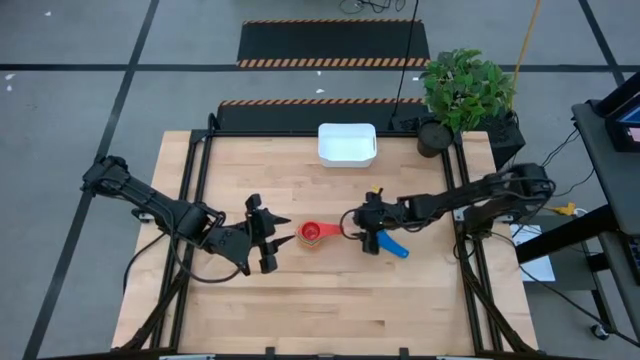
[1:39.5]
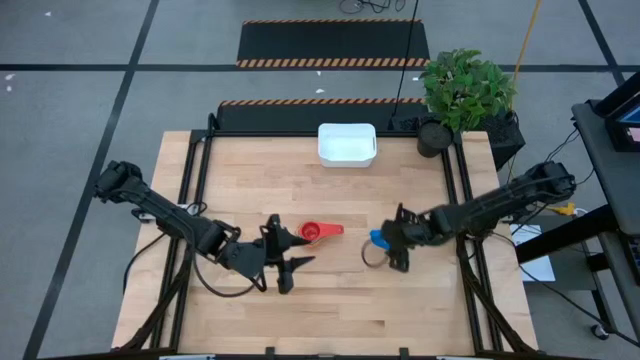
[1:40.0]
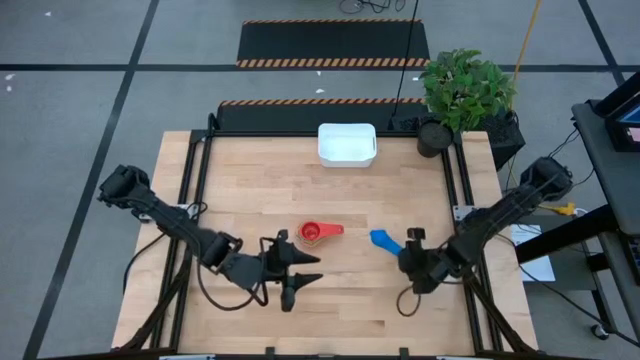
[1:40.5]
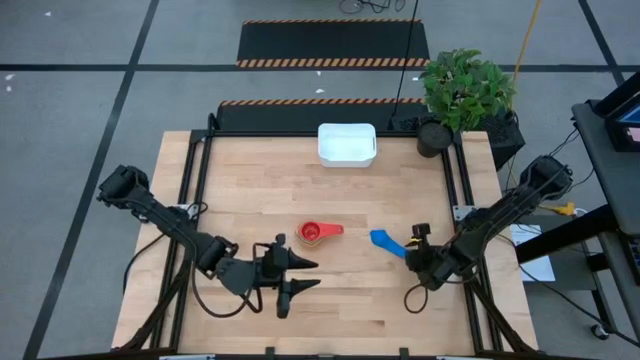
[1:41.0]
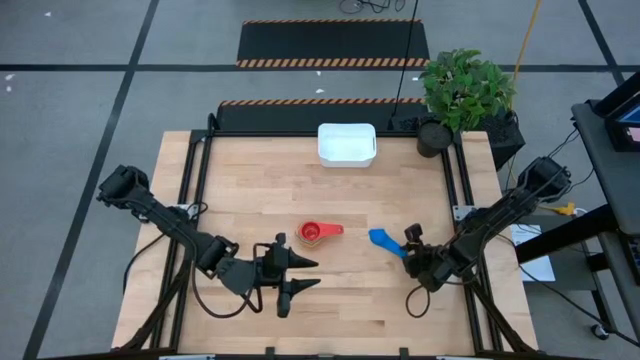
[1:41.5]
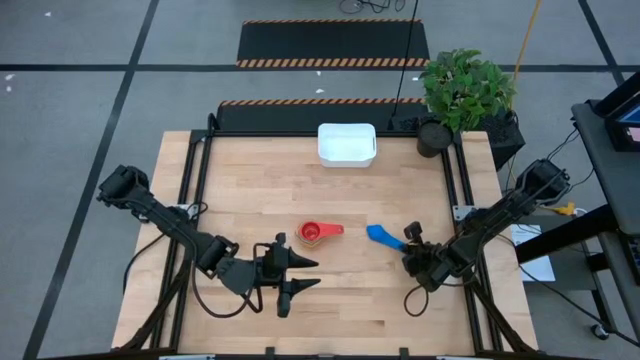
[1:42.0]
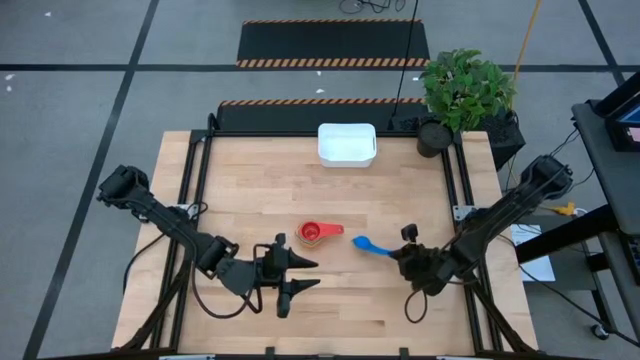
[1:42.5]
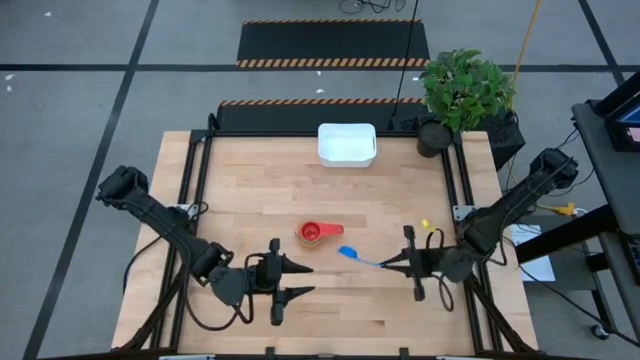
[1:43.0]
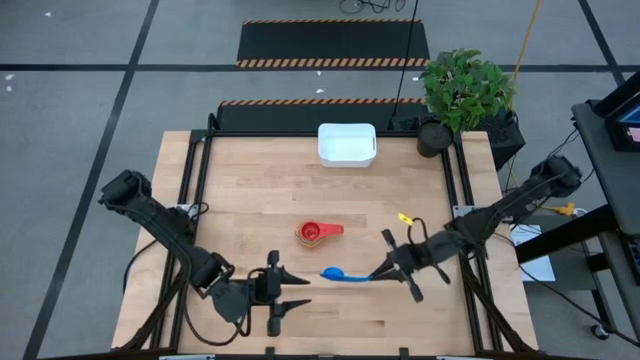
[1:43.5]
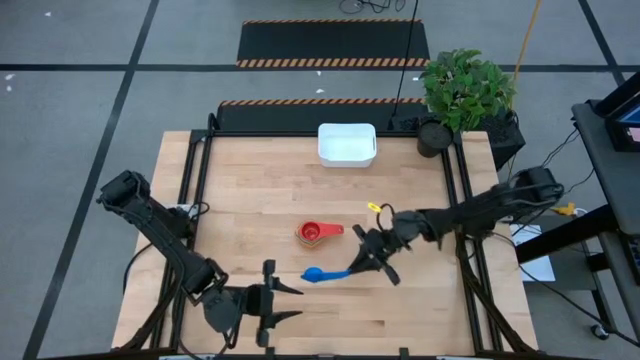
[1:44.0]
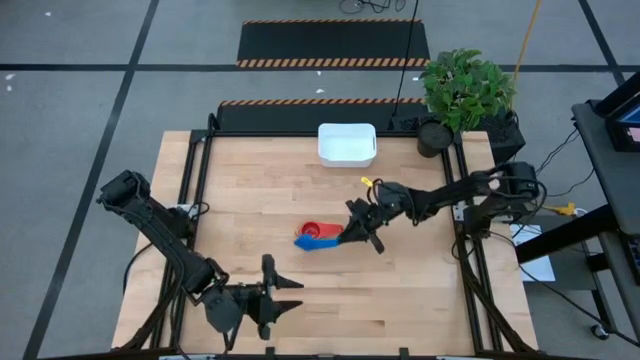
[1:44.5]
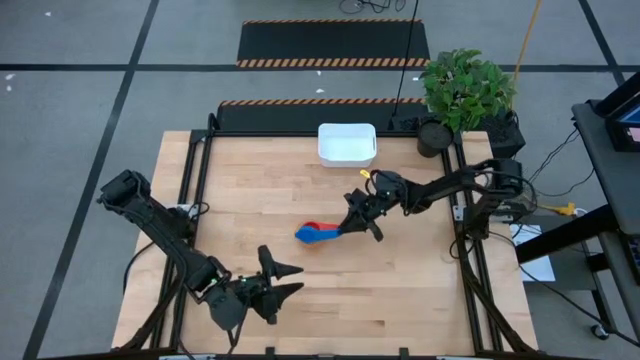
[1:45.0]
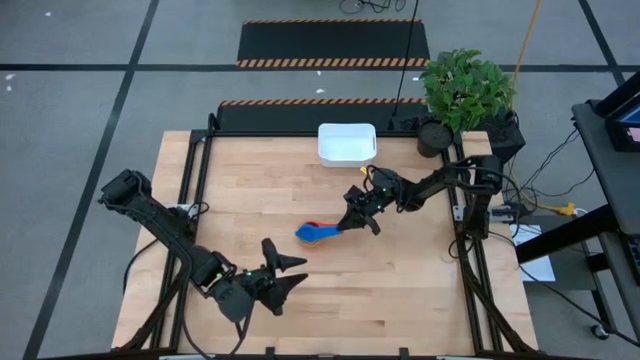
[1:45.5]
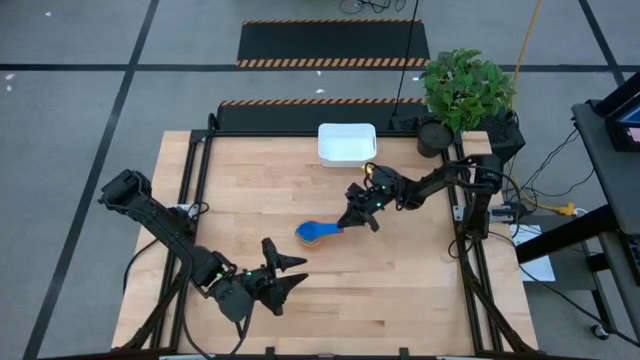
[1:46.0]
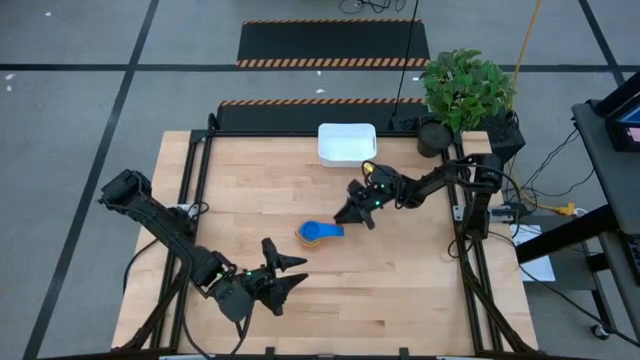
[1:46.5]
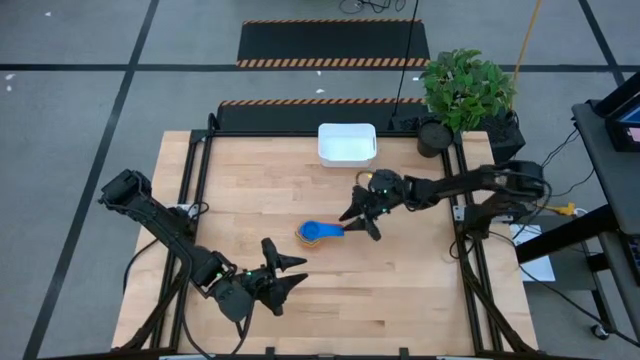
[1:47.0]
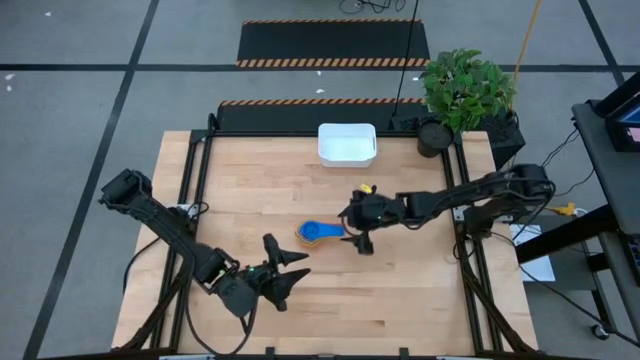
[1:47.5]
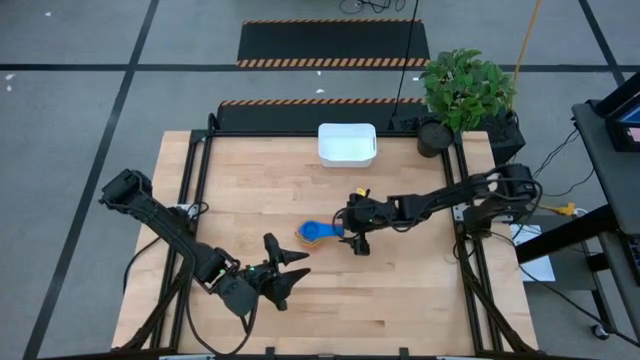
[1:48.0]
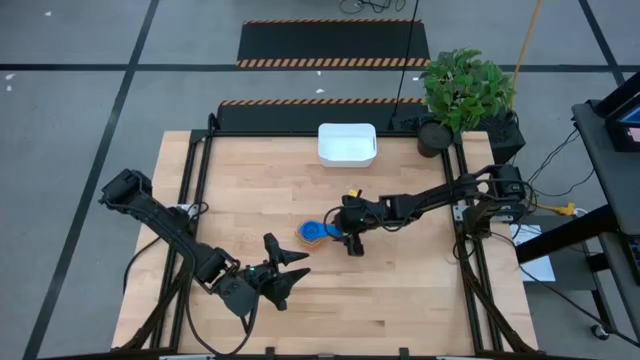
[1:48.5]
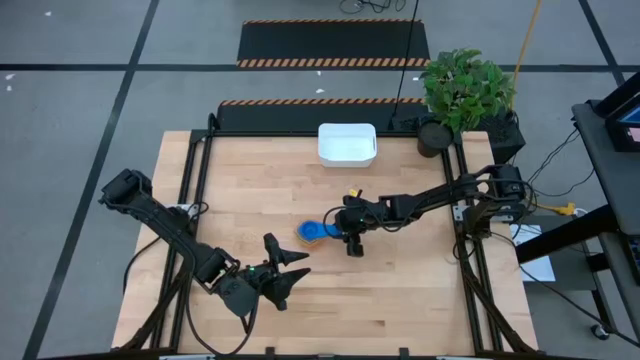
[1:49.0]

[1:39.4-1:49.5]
Task: Nest measuring cups in basket
Stack the blue measuring cup into the red measuring cup

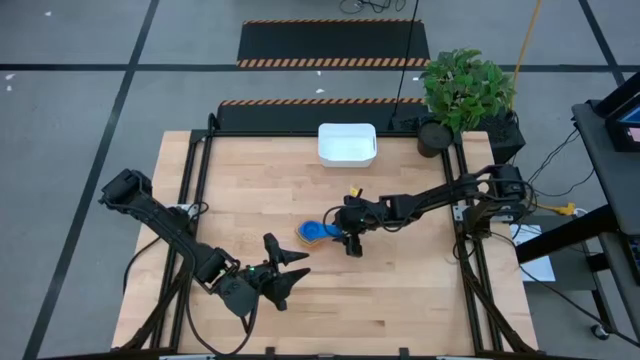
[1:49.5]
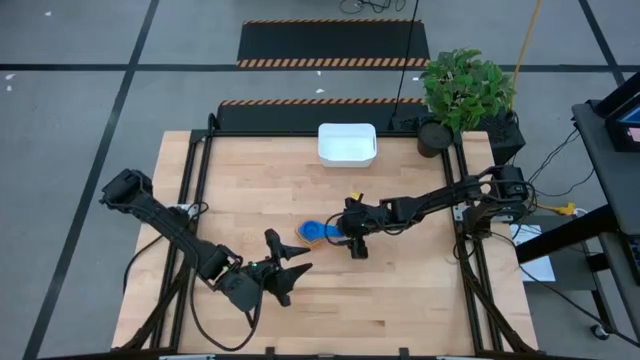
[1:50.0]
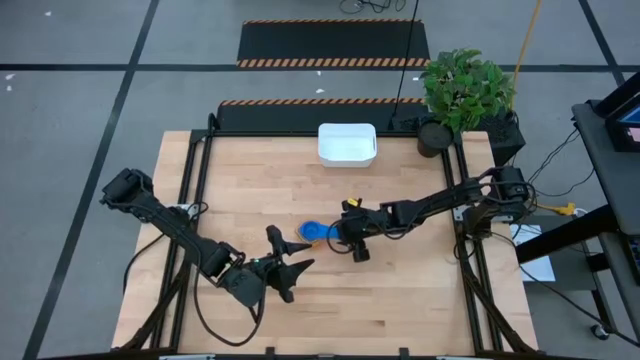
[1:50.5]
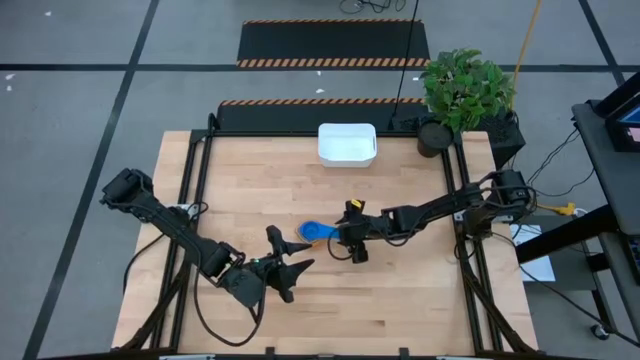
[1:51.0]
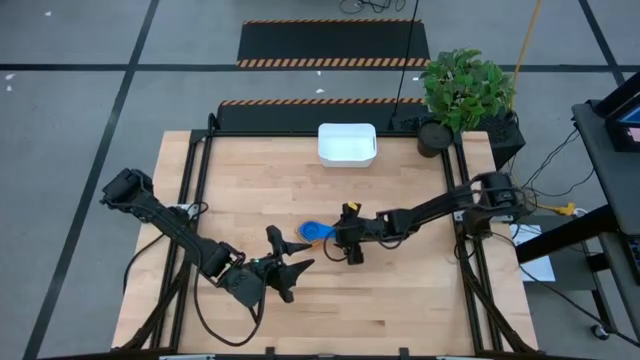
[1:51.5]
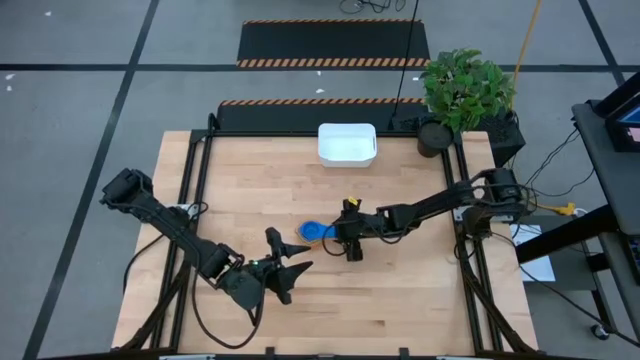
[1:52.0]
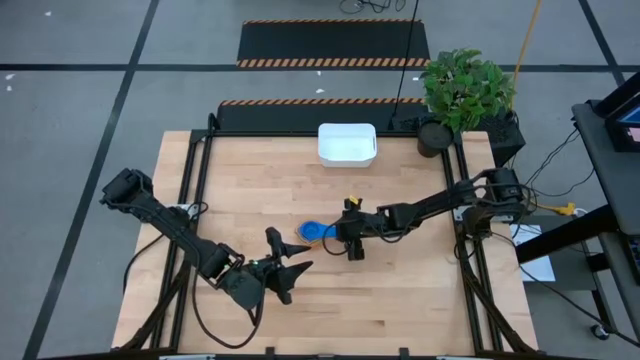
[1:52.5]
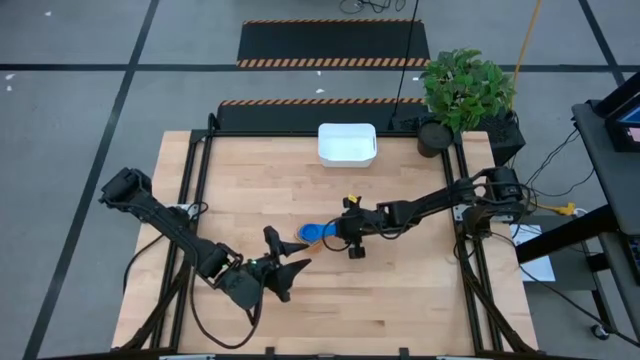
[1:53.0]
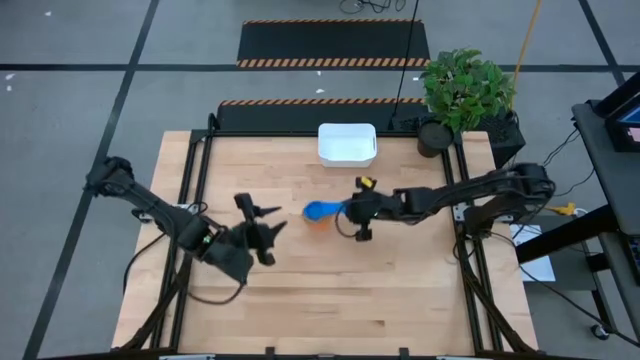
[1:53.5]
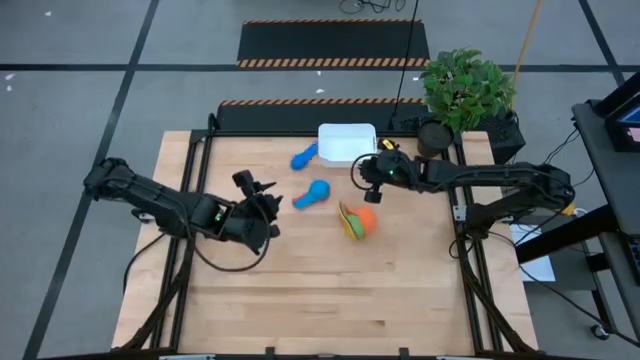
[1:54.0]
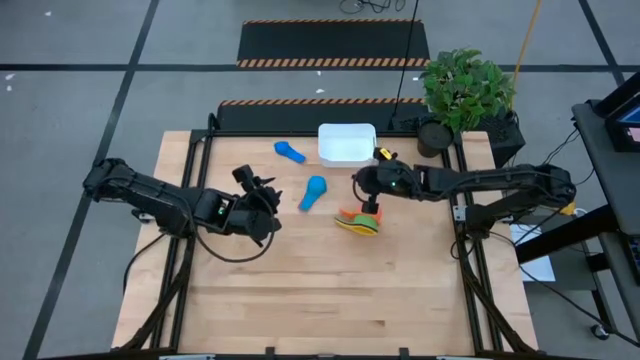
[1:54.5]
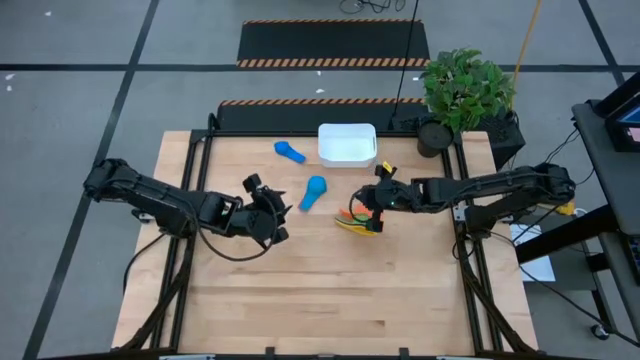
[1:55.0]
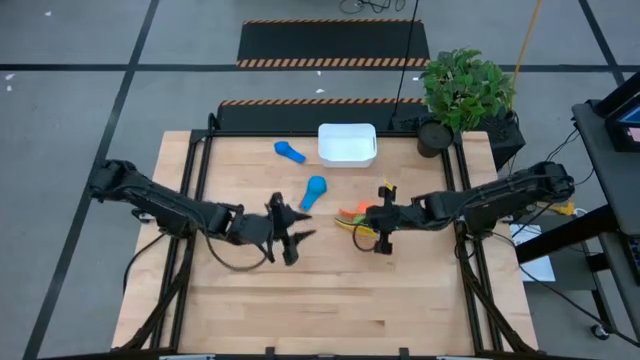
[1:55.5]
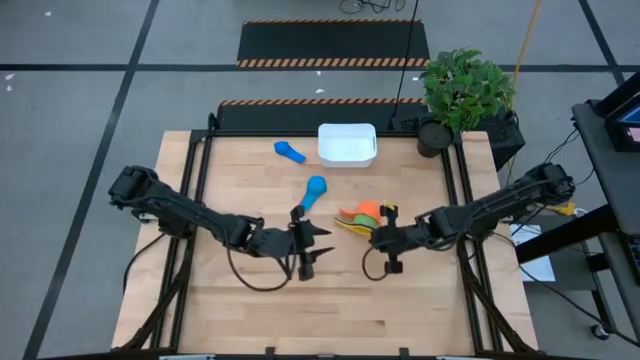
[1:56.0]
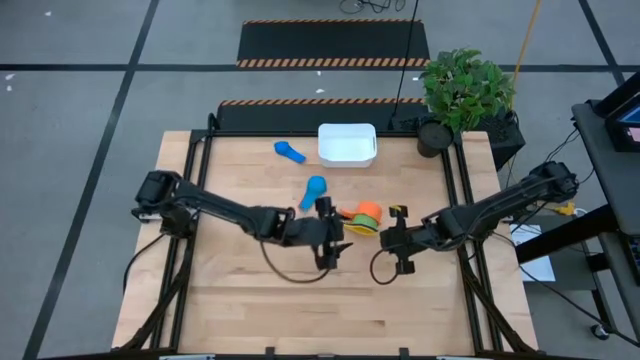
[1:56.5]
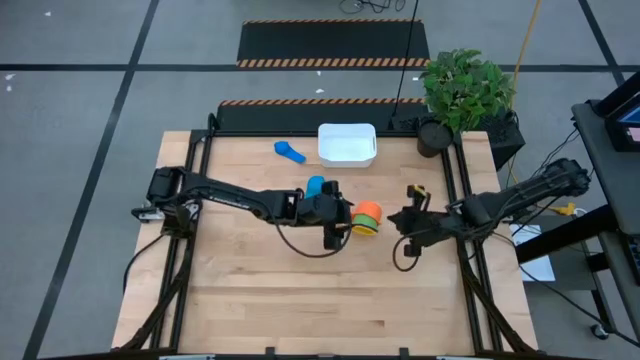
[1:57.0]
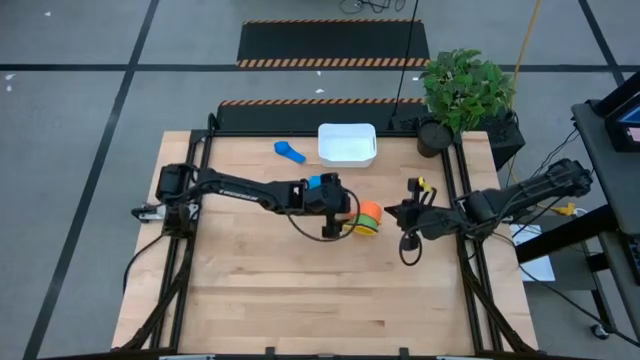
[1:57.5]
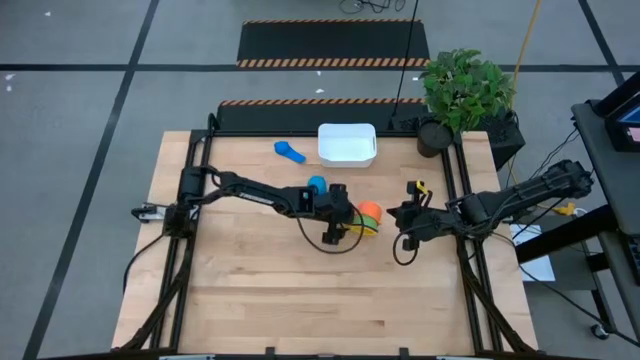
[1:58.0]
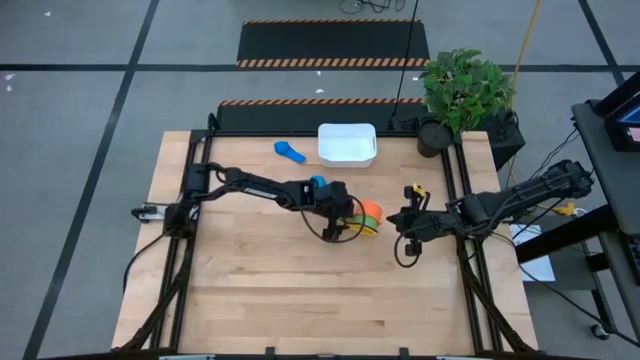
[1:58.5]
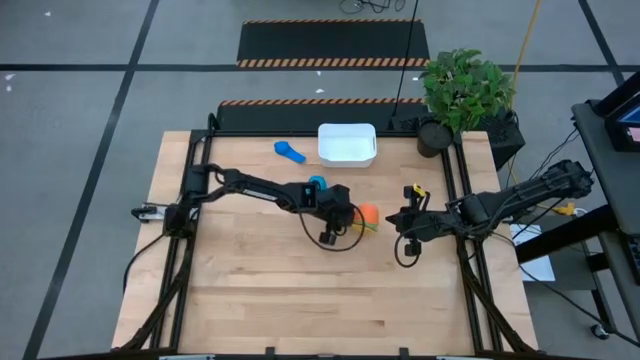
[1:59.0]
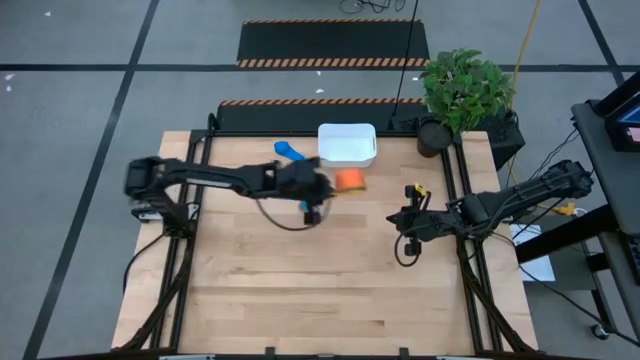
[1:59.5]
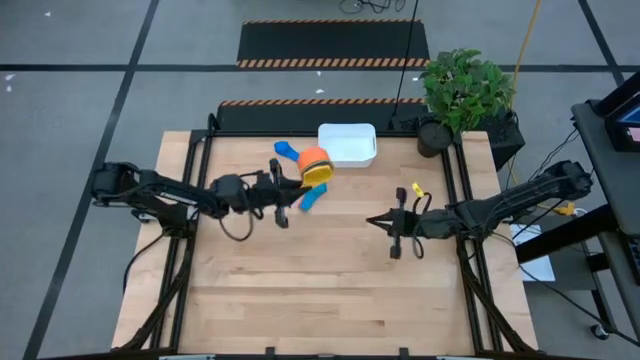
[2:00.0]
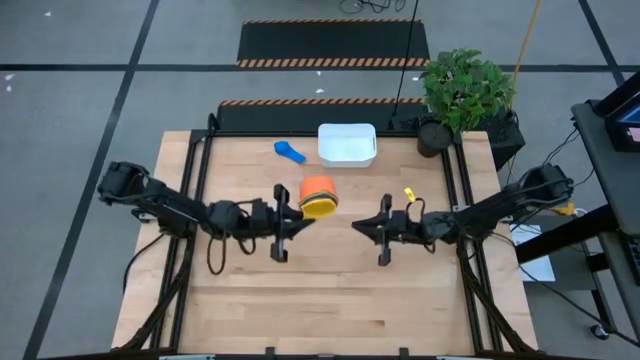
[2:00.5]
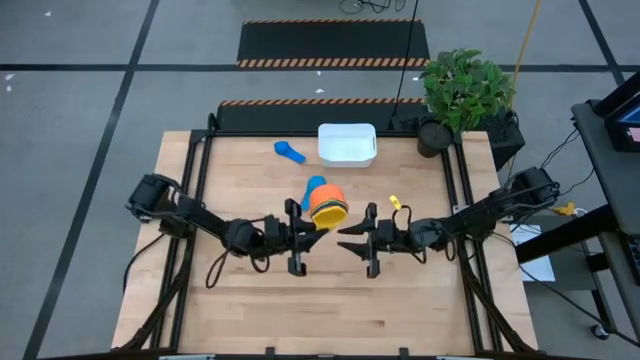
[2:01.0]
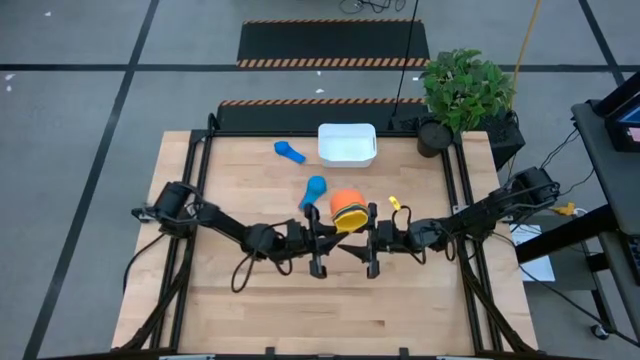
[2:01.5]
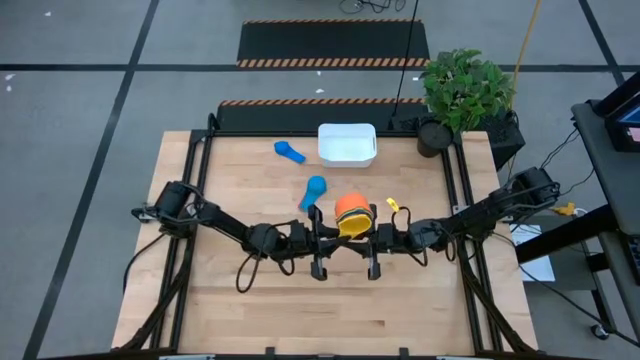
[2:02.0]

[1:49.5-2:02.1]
Put the nested measuring cups into the white bin
